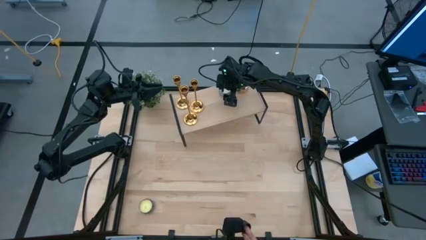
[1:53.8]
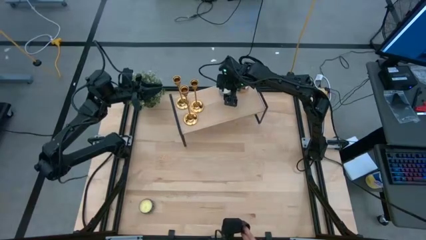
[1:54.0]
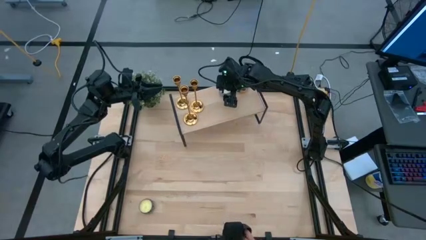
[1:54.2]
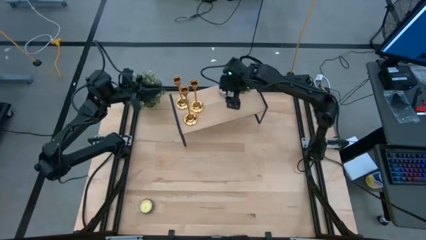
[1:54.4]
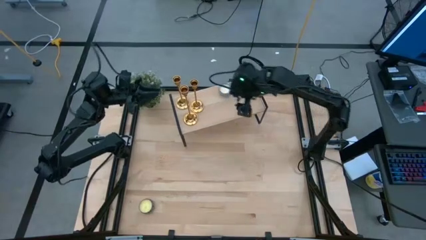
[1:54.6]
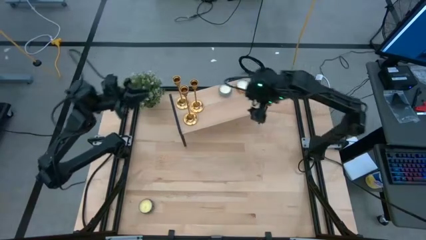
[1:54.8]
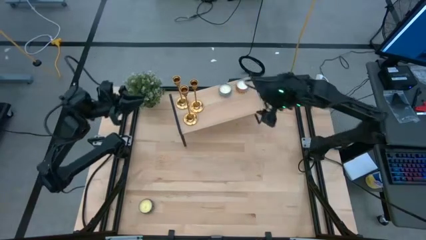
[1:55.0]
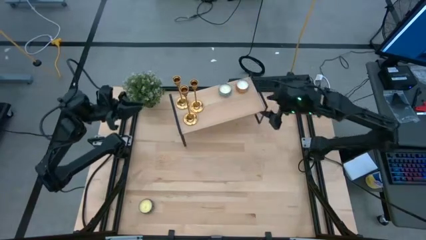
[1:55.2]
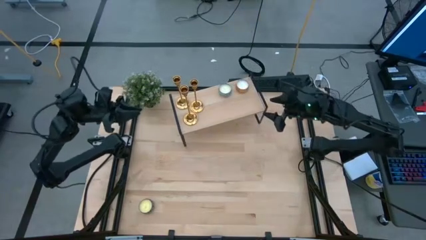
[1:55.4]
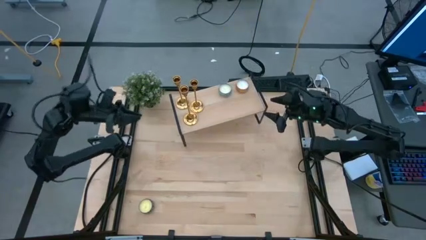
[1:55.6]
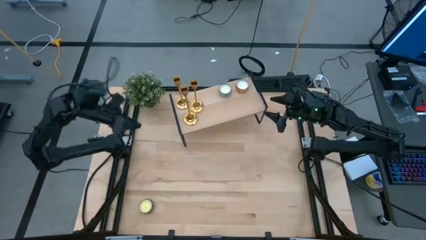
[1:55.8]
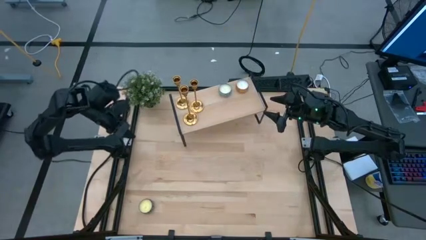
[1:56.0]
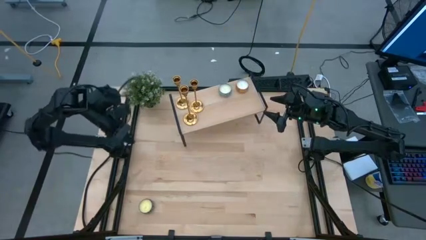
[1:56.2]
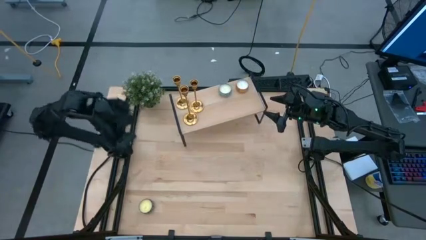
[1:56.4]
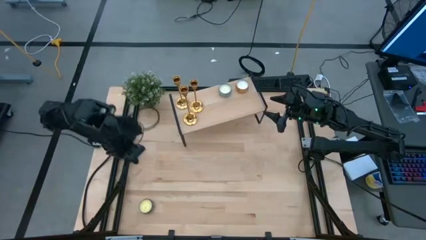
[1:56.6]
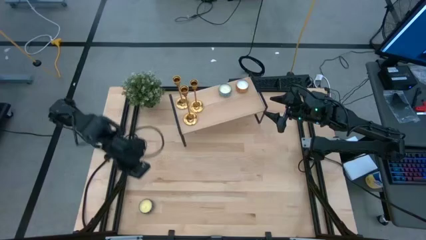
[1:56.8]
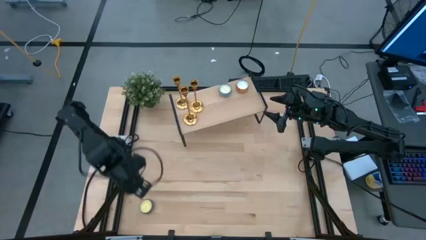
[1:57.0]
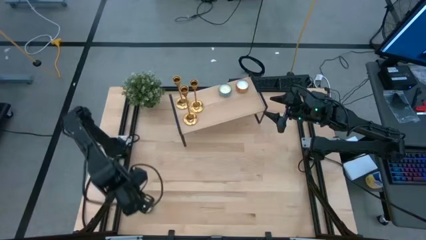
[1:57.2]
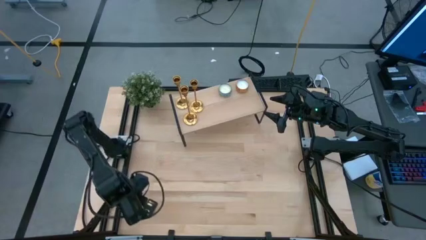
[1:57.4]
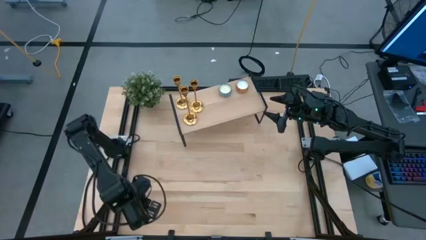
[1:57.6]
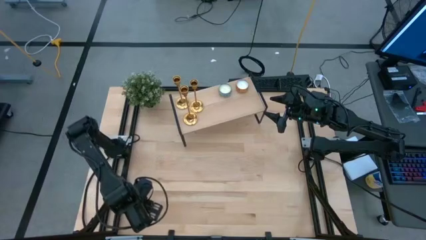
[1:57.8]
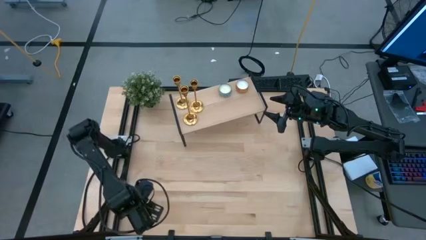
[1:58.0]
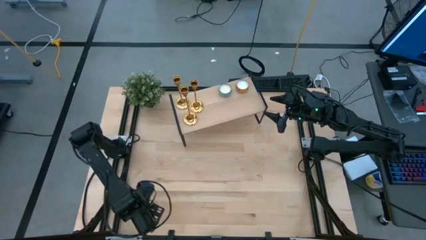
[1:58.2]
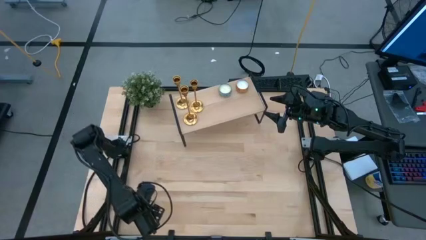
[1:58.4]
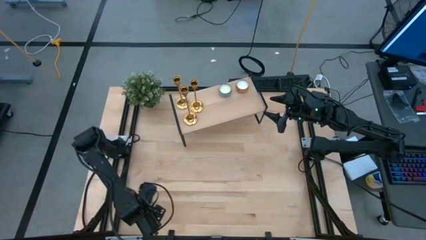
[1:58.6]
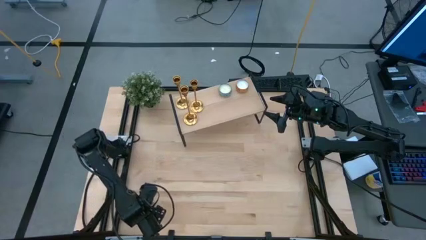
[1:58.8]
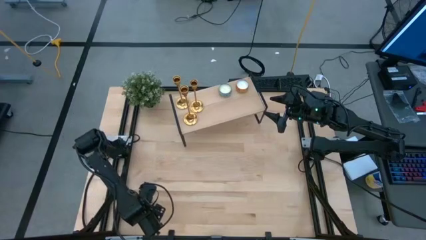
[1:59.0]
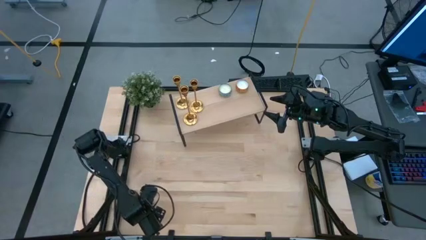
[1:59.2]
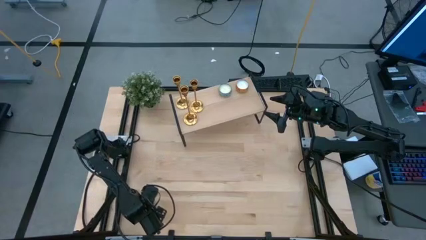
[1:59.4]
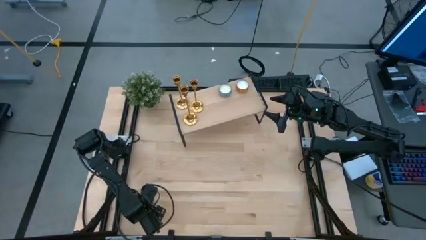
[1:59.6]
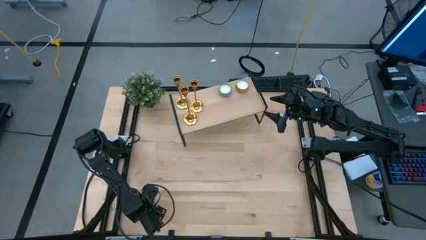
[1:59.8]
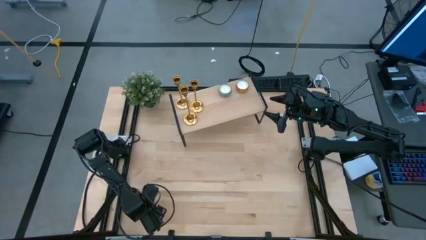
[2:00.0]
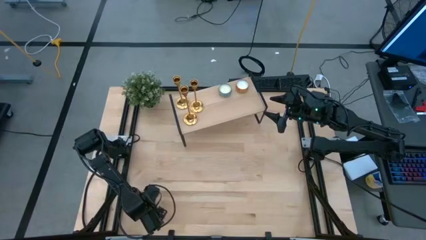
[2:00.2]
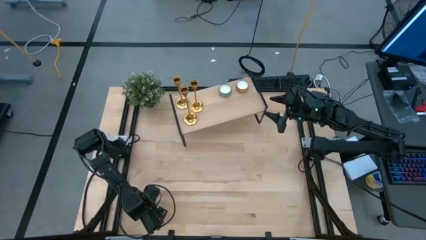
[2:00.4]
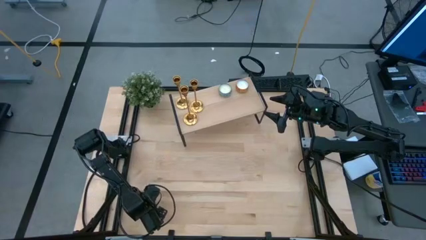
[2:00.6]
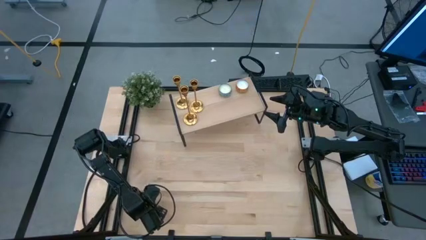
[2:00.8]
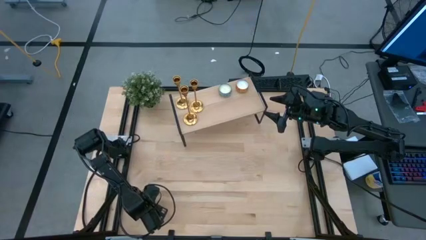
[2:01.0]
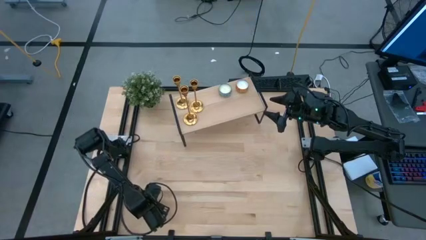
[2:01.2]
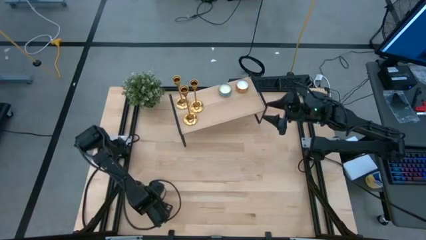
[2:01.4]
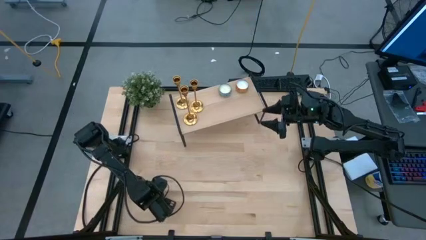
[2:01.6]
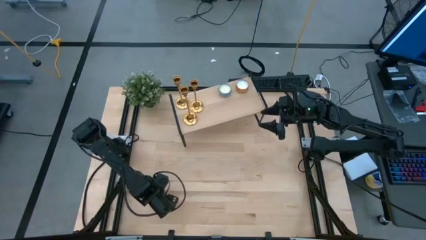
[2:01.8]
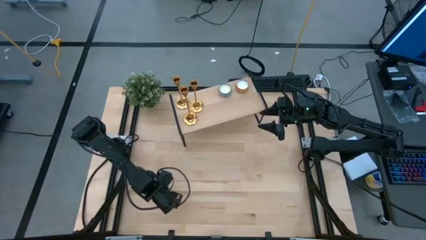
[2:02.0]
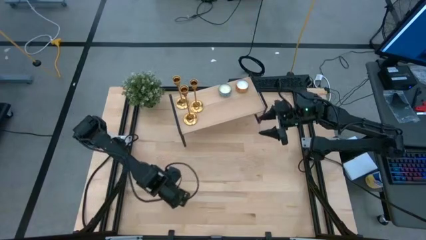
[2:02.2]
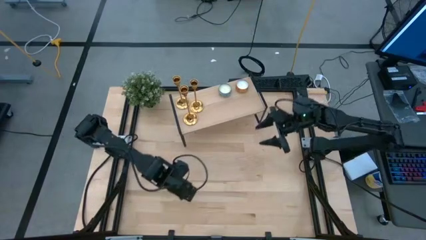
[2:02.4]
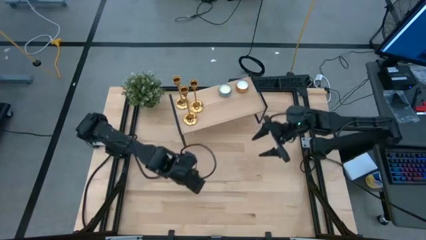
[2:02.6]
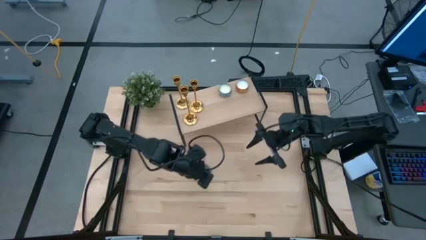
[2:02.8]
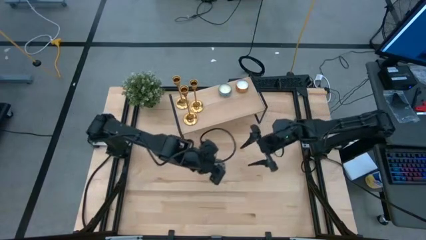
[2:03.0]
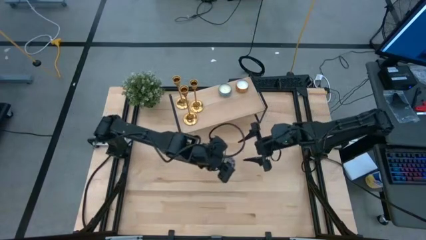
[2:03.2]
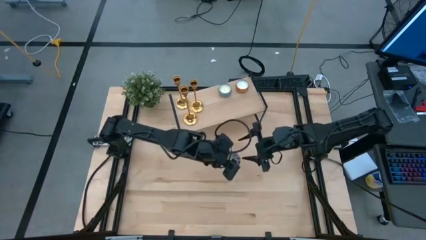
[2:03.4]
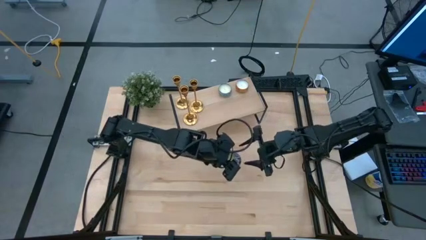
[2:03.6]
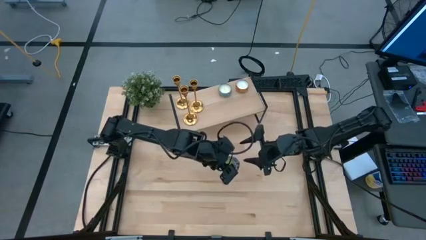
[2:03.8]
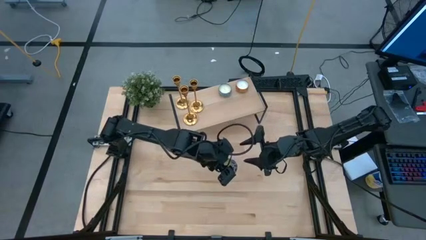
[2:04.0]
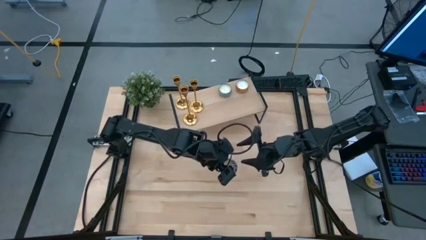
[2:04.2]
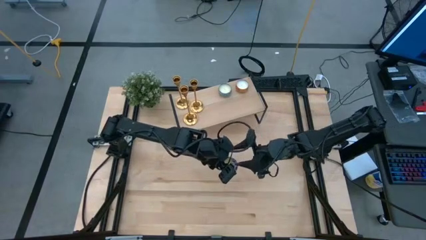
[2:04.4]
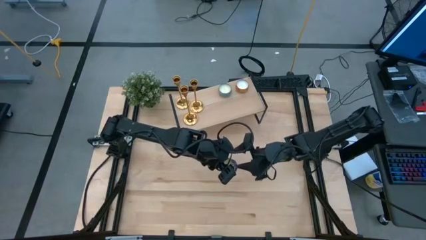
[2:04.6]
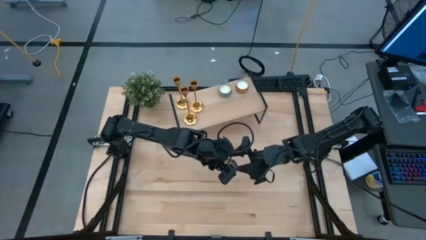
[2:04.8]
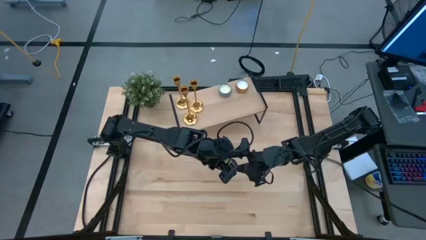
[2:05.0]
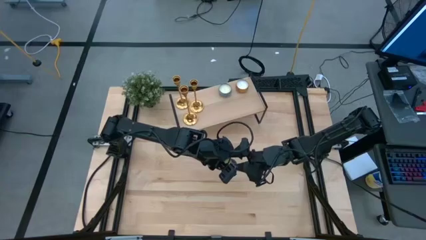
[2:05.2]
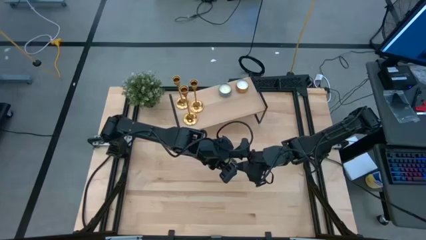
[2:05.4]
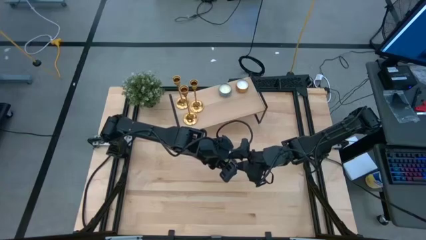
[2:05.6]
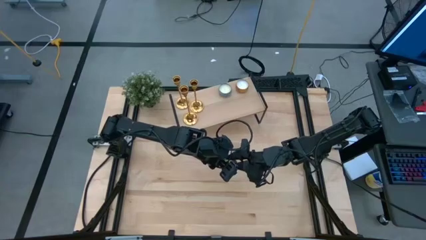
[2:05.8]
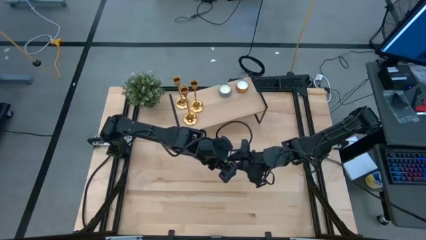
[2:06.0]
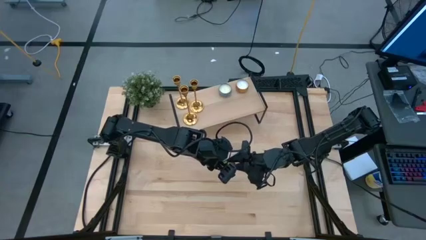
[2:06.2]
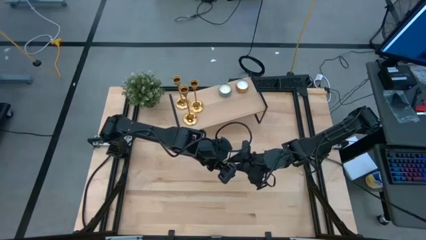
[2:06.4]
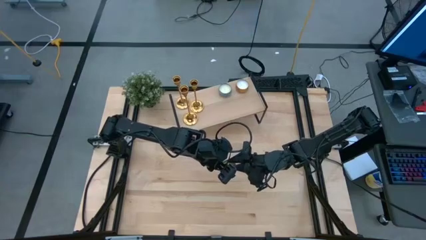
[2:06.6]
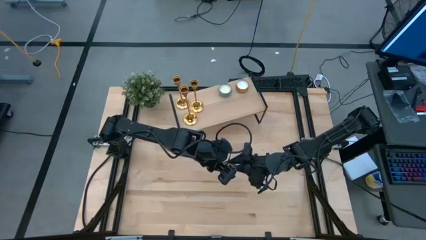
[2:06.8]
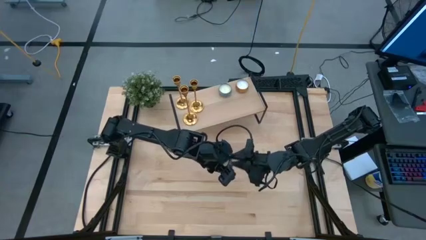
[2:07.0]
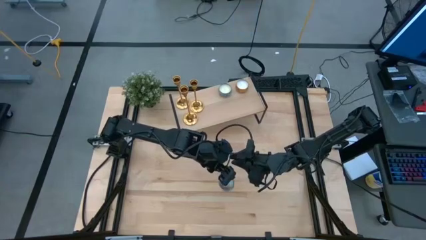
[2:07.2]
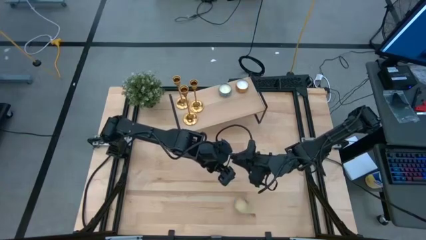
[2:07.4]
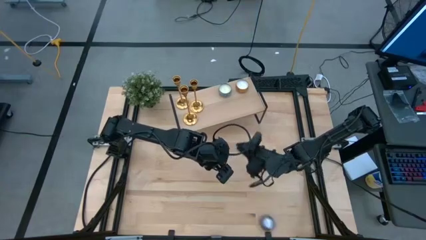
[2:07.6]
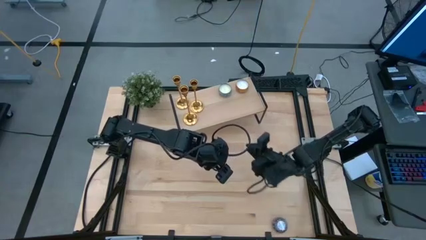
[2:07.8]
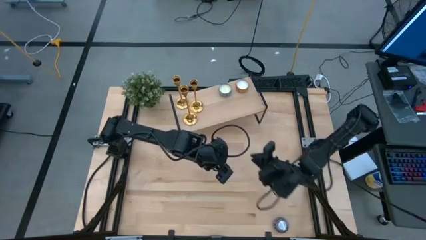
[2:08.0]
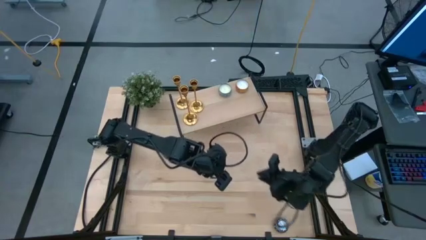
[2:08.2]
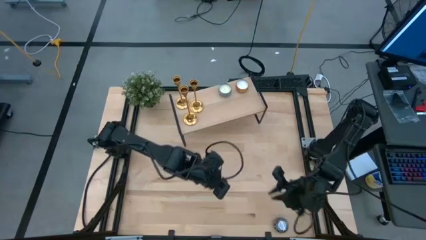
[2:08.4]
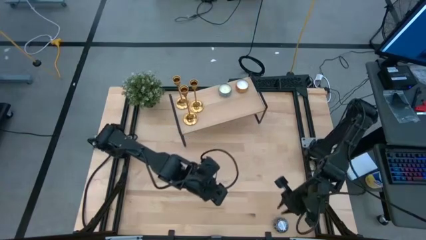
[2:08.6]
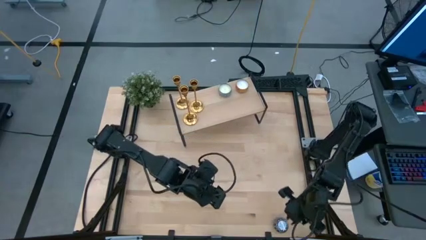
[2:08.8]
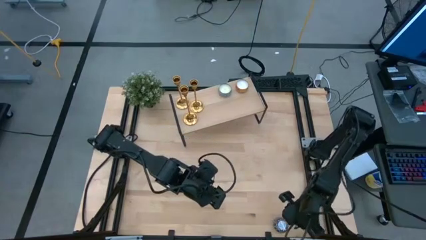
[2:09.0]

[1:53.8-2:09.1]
Task: Pick & Place candle stick holders
Put the black scented candle on the shelf
